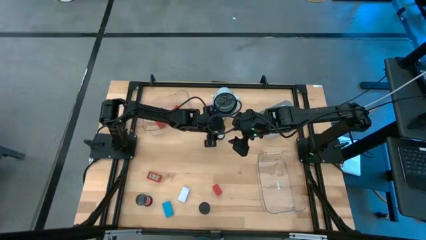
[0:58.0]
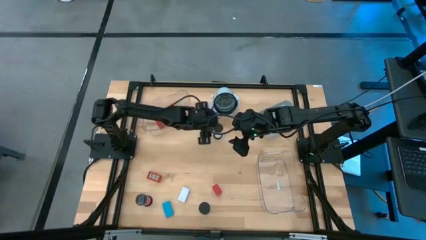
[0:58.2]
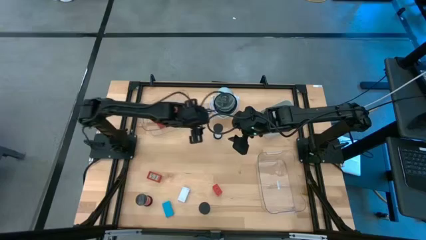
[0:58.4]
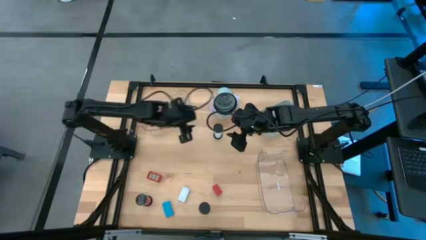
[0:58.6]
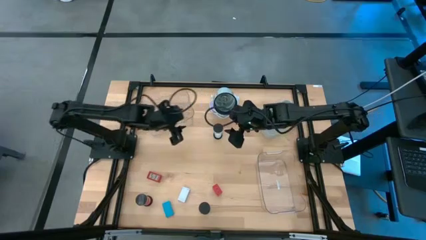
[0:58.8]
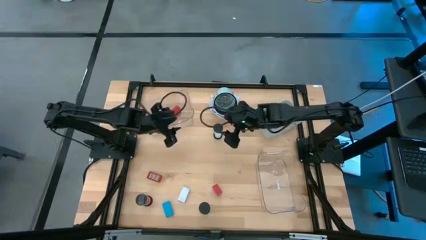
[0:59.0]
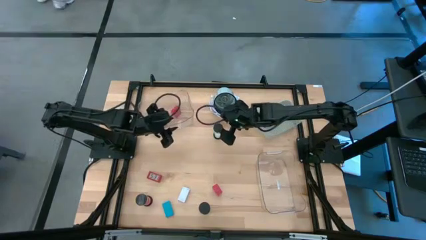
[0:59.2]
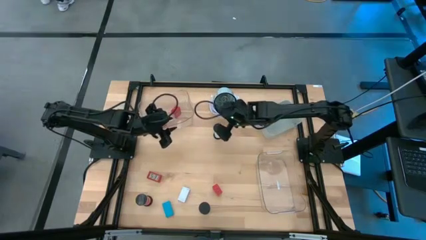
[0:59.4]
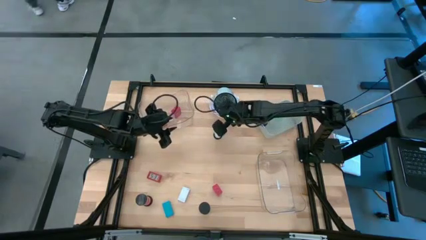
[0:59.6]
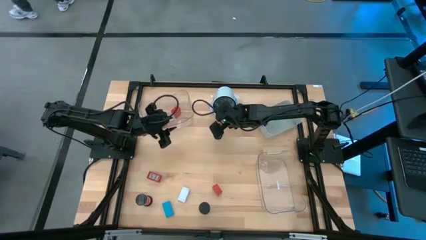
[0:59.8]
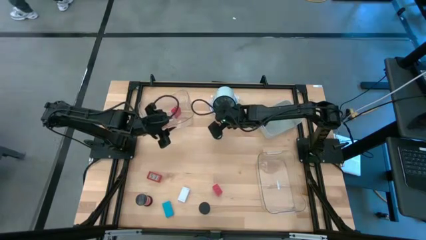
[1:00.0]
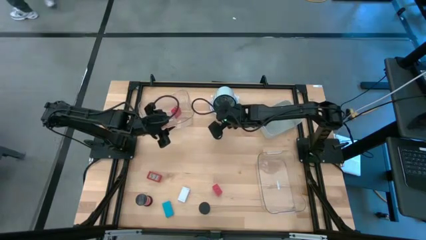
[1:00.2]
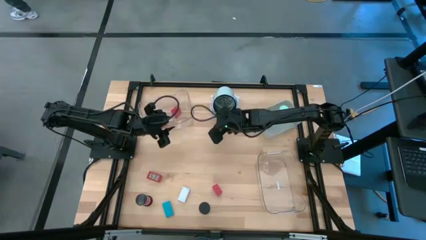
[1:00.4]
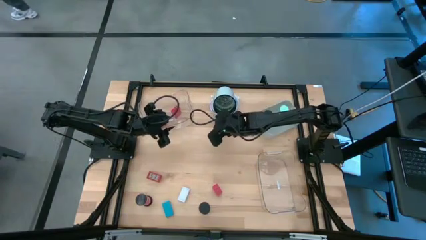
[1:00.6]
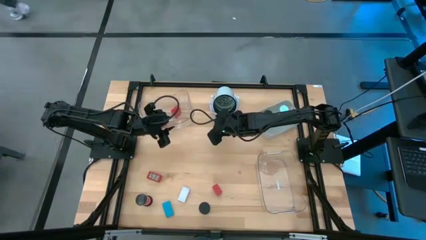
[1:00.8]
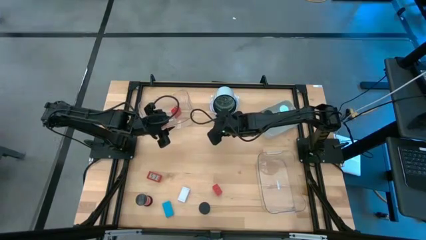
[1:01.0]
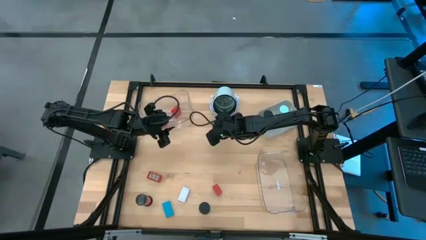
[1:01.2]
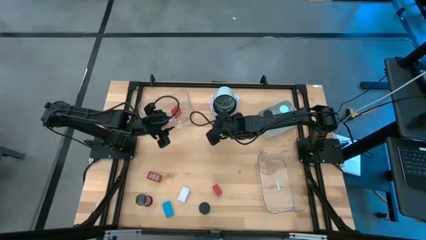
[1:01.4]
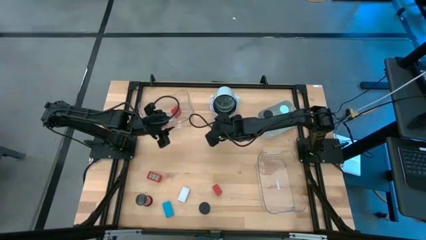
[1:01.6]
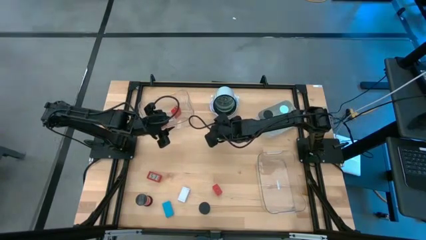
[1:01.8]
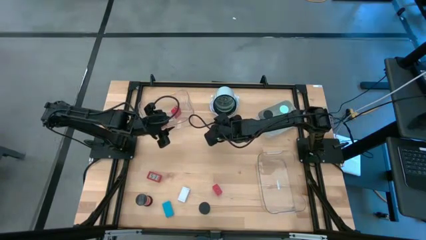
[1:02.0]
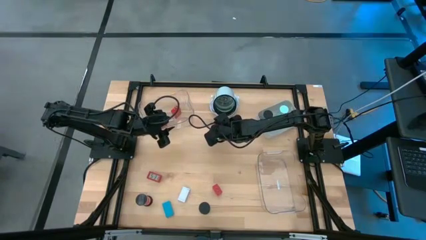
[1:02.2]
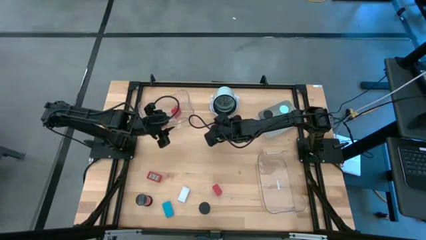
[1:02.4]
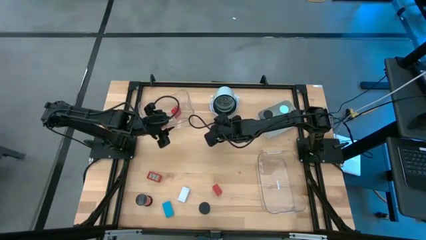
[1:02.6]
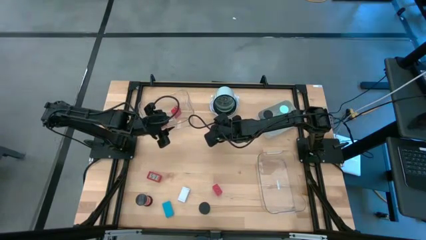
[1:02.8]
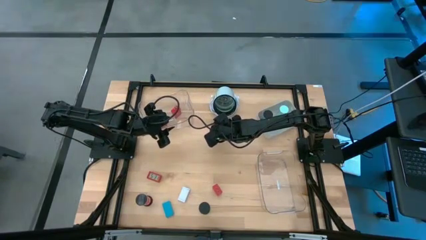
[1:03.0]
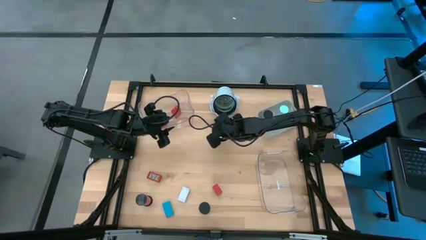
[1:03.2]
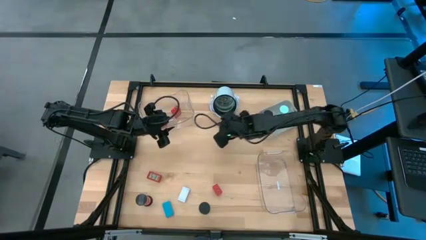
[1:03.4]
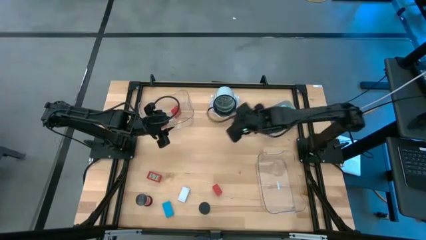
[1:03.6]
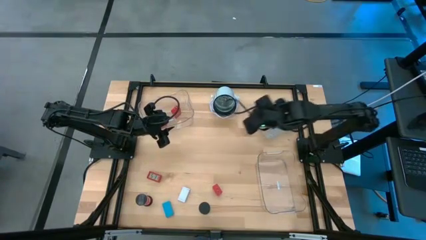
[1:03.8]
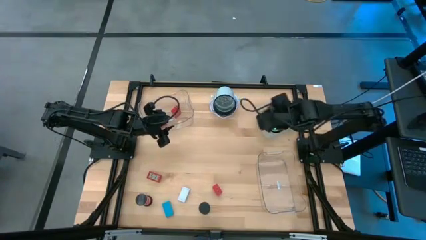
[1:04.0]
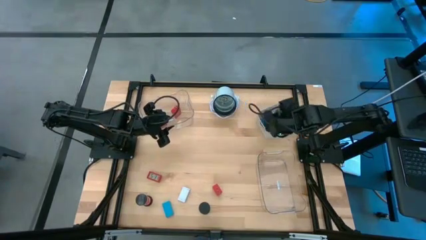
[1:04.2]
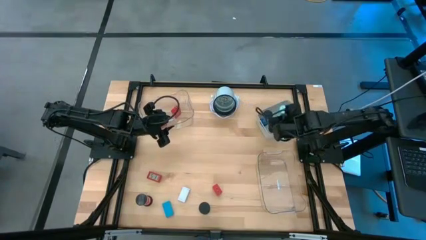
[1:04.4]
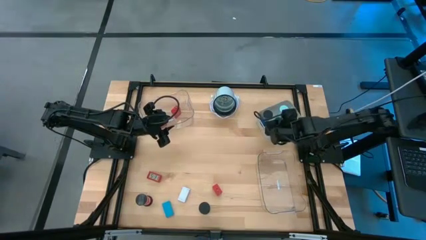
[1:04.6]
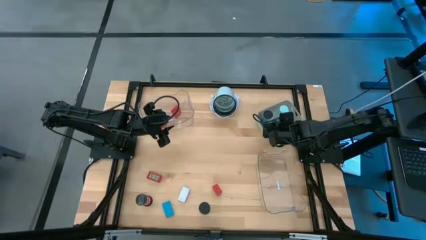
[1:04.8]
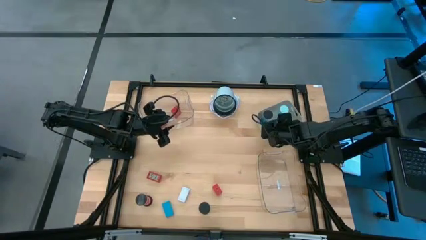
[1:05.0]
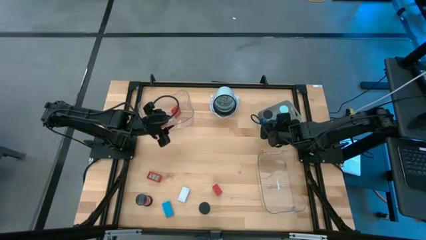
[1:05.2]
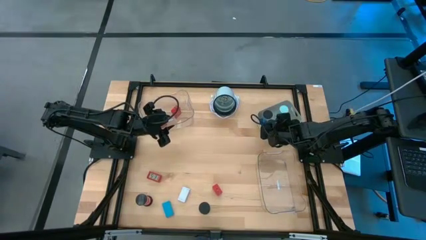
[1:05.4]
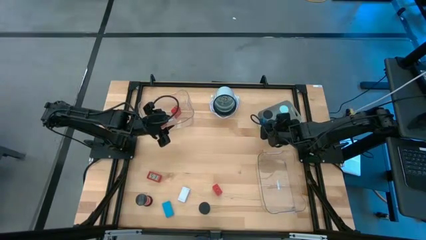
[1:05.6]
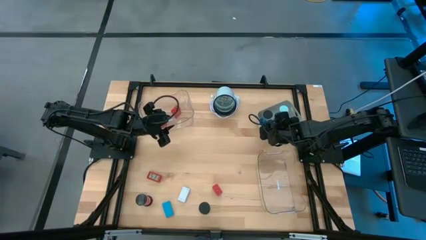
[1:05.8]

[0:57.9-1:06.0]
Task: Pick & Place Office items
Put the white hourglass into the gray bin

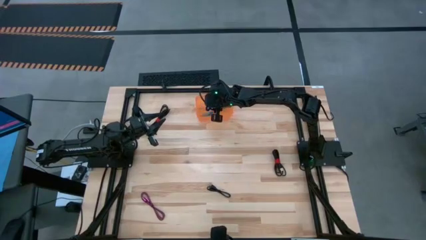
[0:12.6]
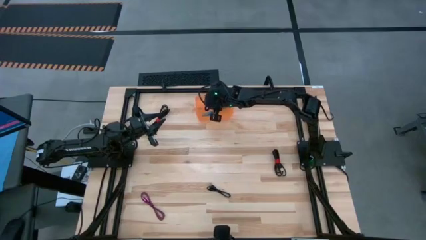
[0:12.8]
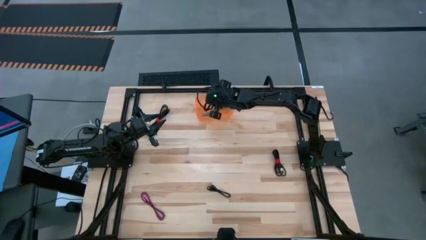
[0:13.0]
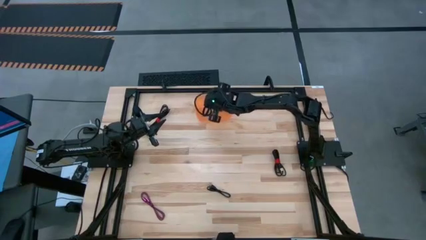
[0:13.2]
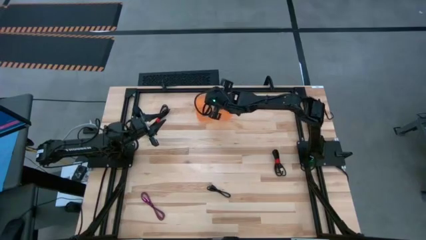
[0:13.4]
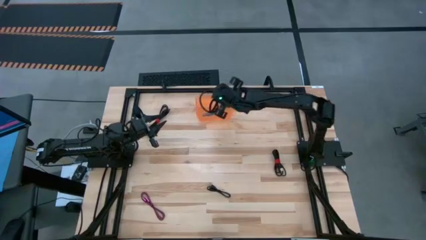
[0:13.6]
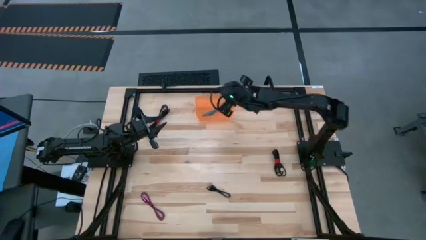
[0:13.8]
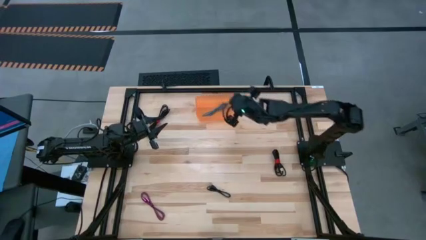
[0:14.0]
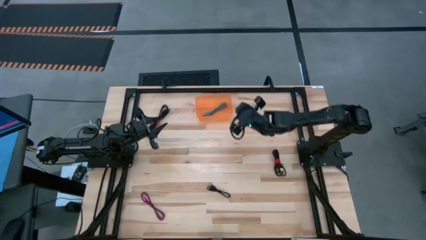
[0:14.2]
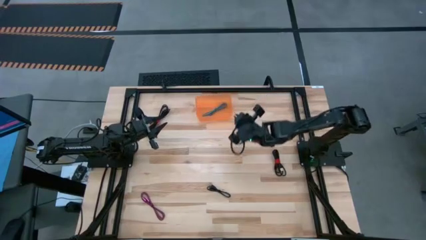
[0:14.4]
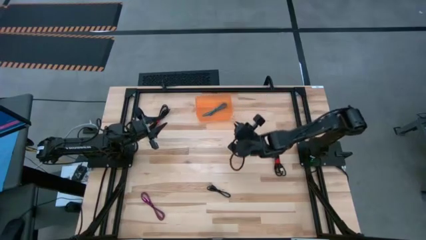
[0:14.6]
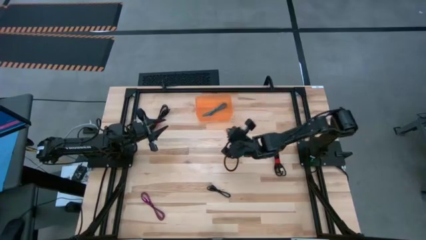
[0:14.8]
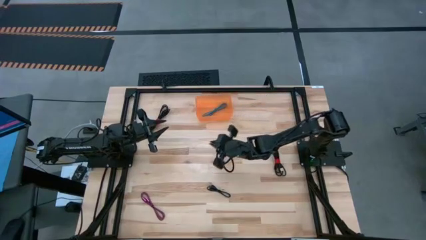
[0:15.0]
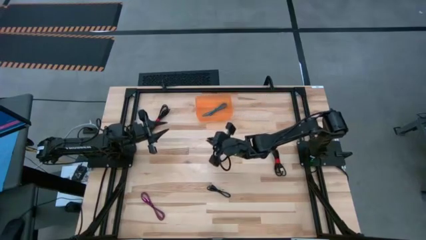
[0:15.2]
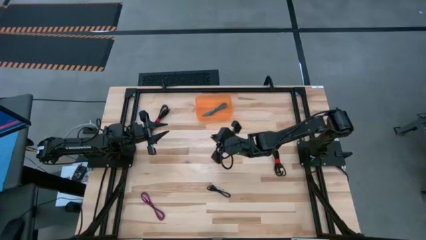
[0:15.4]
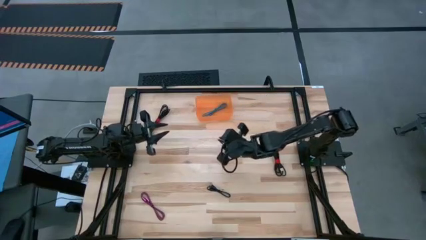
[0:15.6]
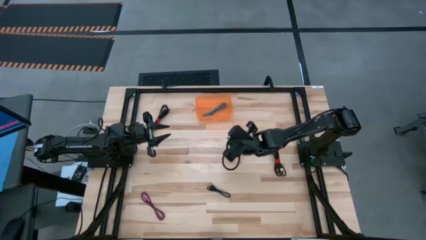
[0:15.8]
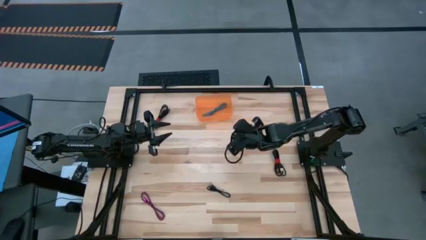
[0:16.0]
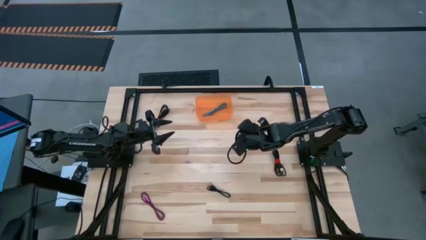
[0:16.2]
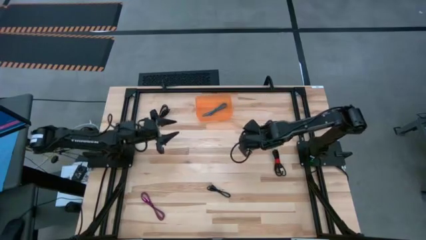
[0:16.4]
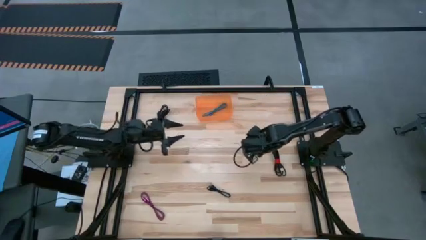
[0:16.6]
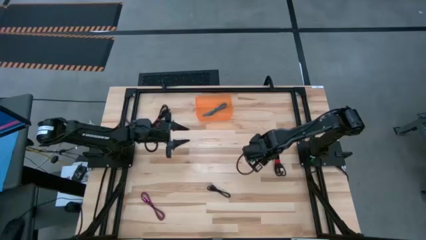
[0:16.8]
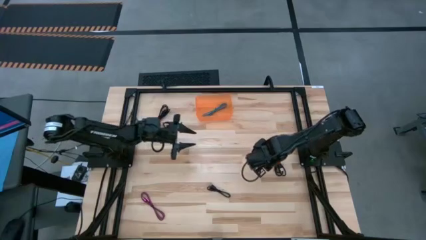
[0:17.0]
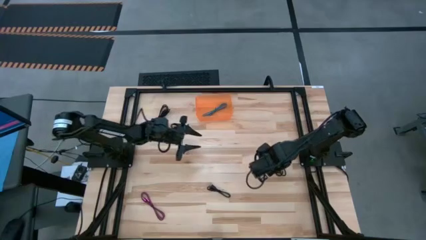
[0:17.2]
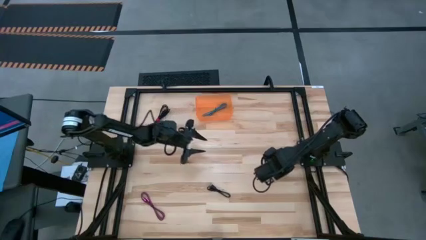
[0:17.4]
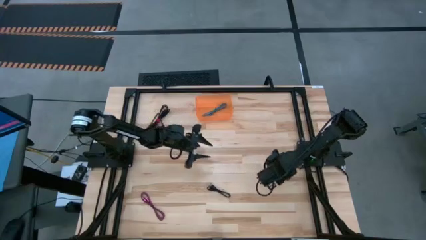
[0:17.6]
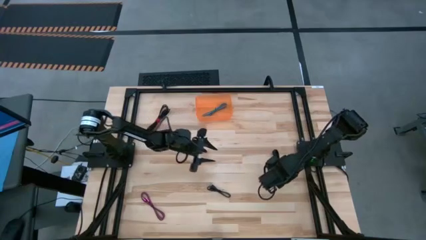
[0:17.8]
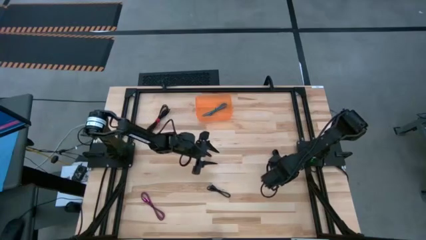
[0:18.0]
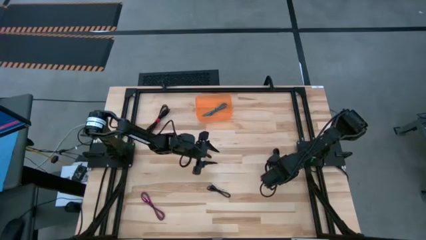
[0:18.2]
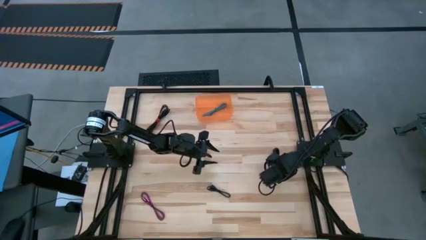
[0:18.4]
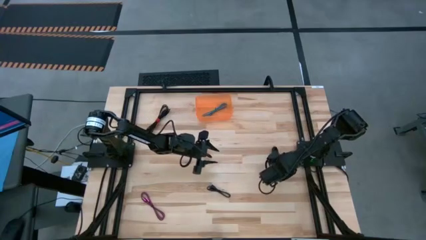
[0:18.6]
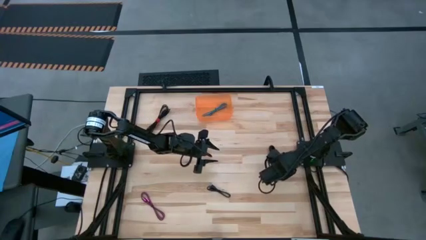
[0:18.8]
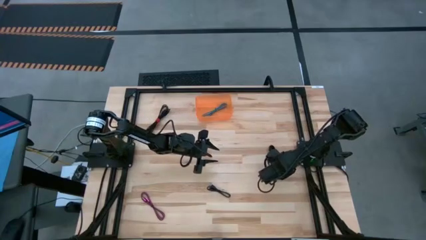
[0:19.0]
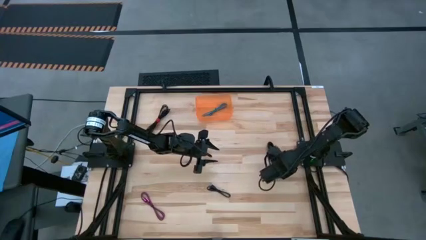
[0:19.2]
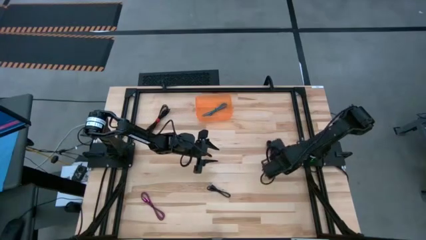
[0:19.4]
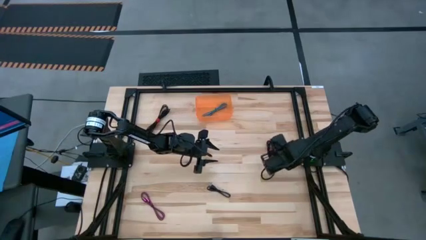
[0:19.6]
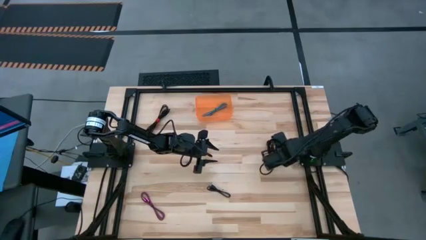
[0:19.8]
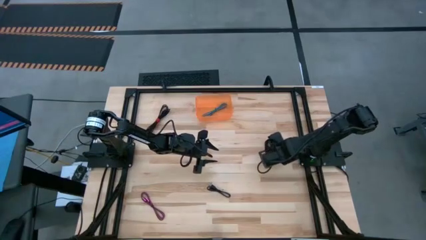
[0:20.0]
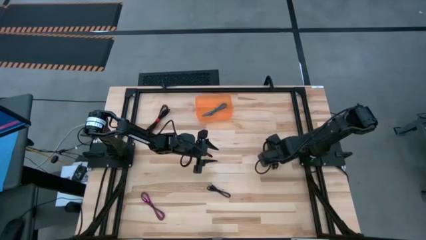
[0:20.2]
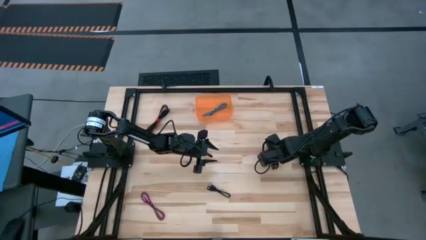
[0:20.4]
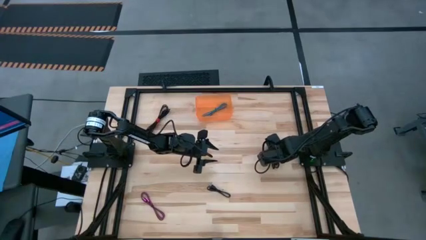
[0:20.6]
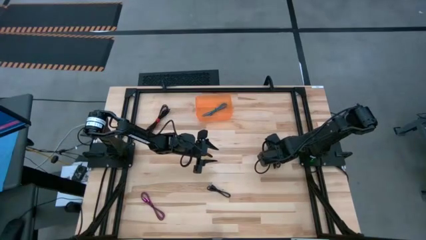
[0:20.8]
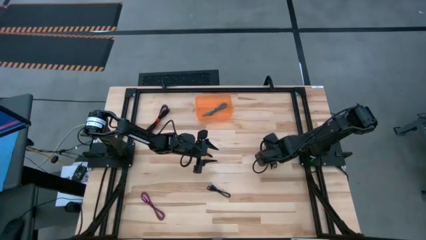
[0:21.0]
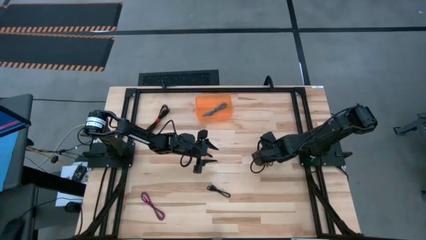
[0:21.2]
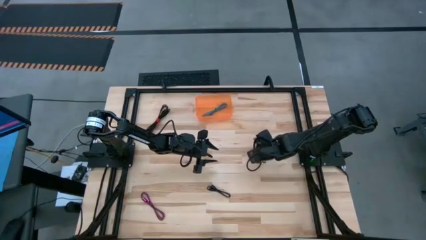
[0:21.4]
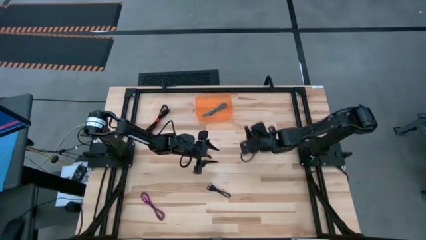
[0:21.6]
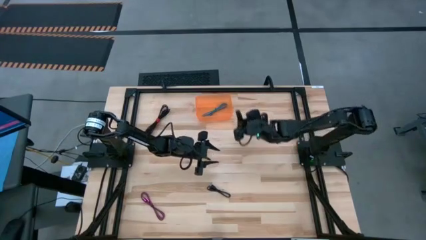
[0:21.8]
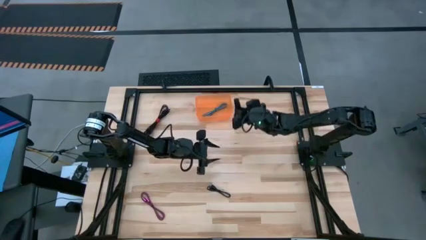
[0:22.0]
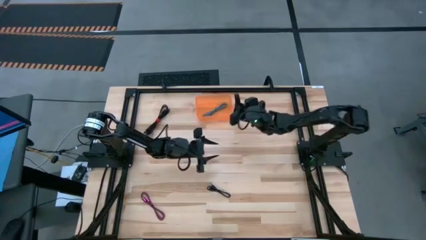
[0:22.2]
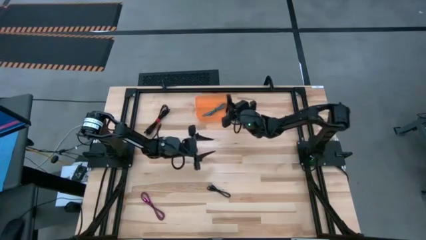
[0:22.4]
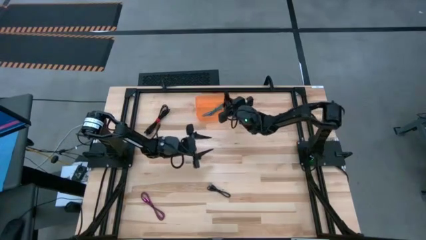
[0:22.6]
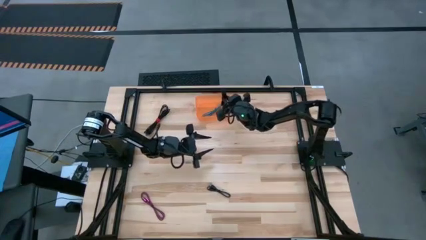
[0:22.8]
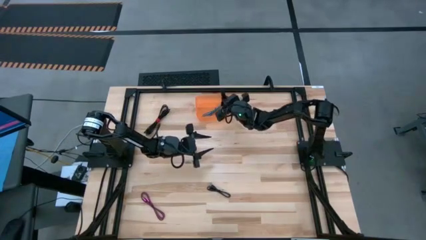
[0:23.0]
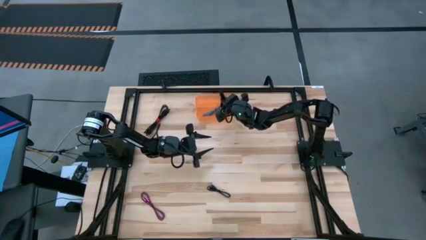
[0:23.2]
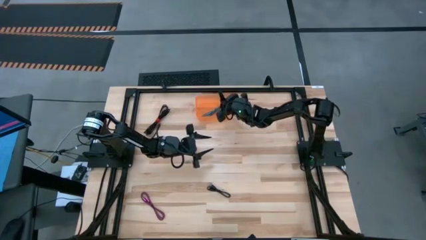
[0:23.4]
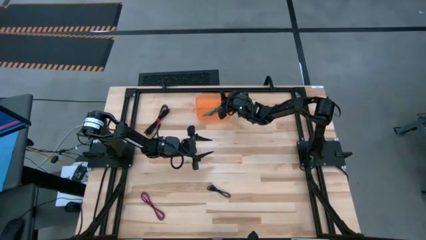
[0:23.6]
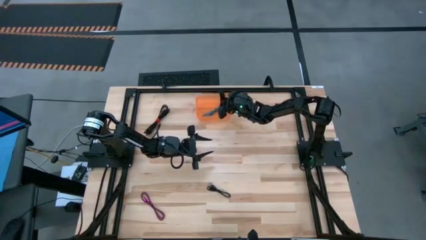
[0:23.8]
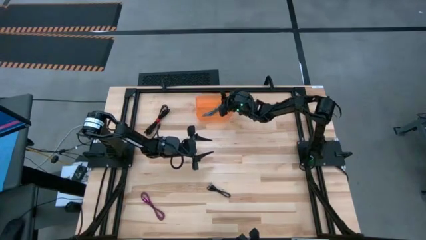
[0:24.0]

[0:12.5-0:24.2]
Task: Pick and place USB-C Cables
Put the right black charger cable into the orange bin
